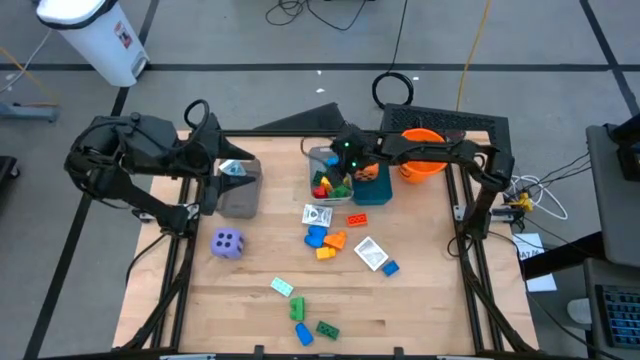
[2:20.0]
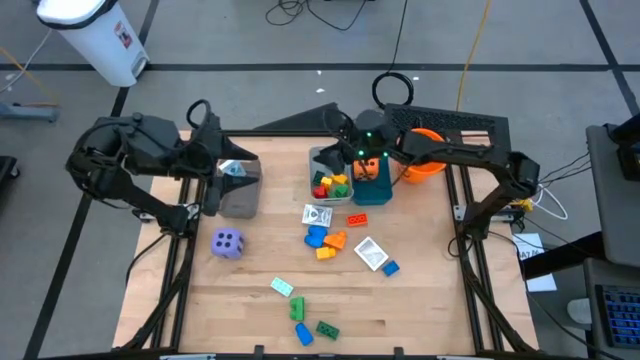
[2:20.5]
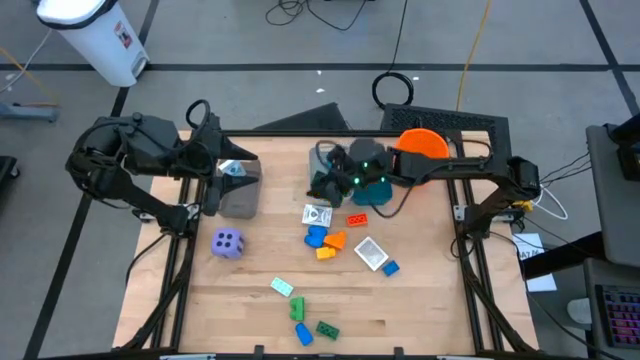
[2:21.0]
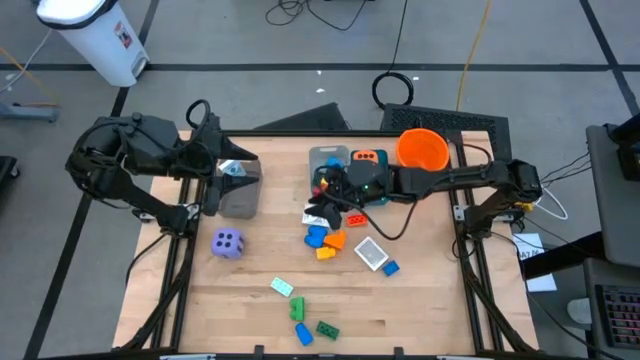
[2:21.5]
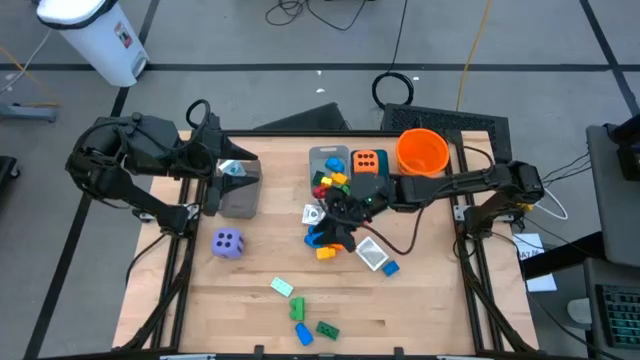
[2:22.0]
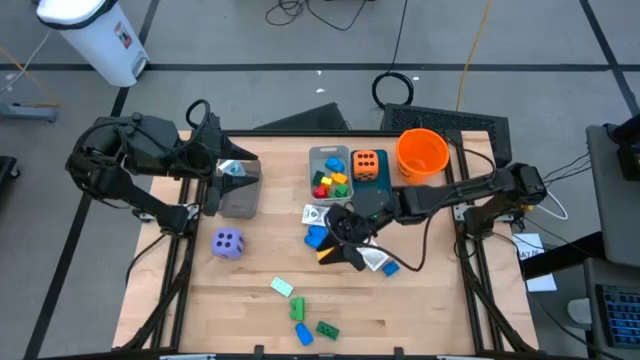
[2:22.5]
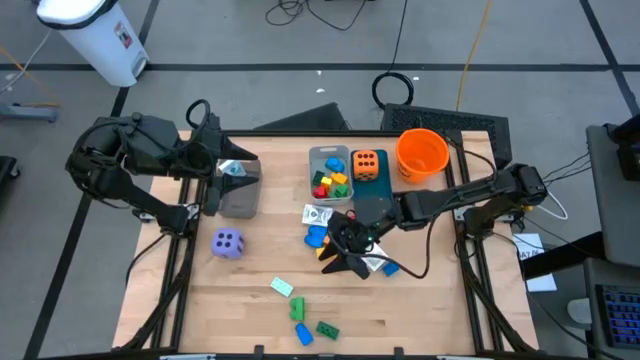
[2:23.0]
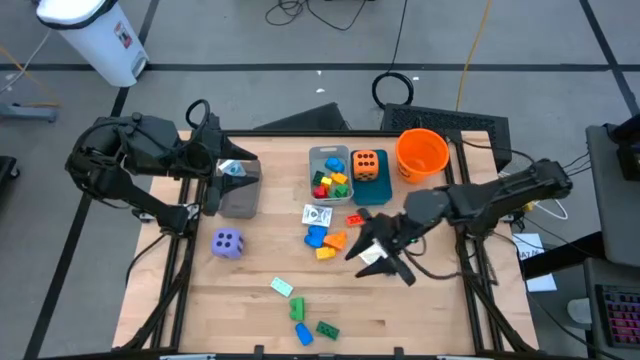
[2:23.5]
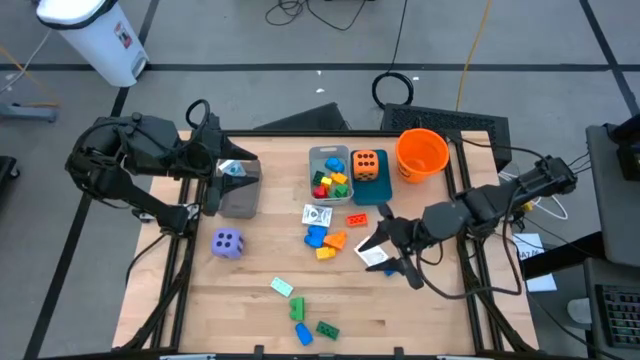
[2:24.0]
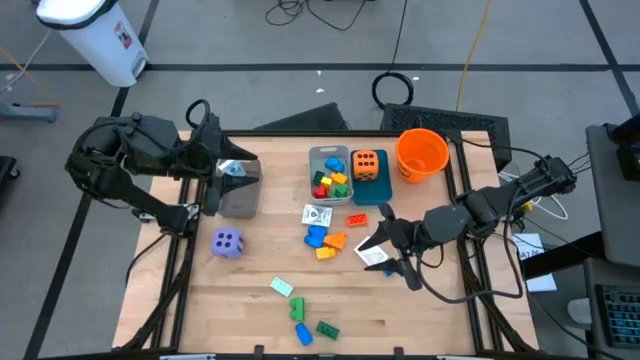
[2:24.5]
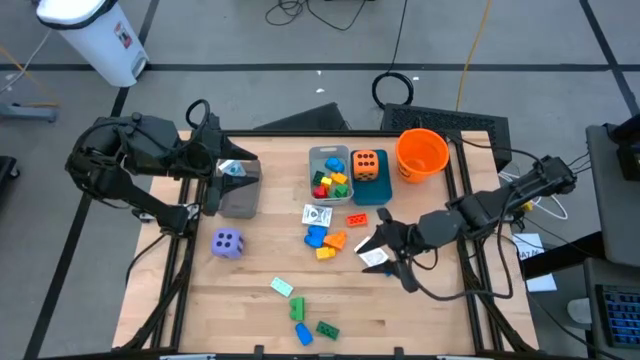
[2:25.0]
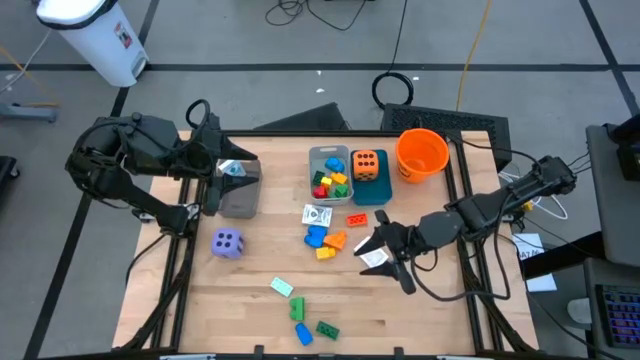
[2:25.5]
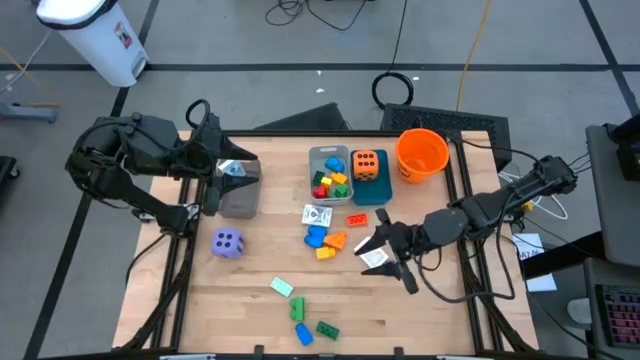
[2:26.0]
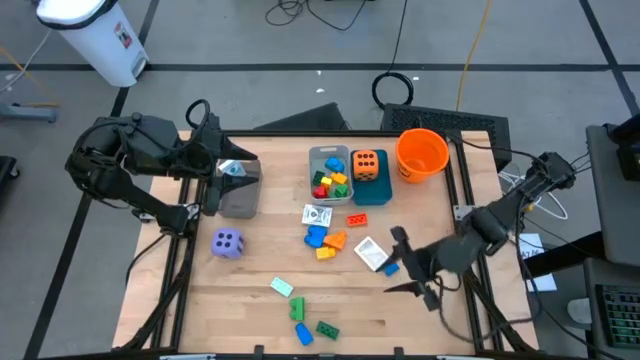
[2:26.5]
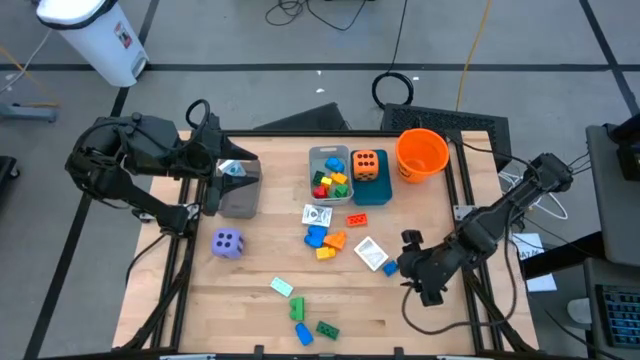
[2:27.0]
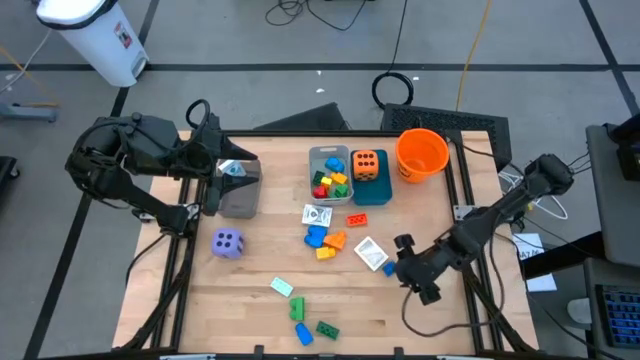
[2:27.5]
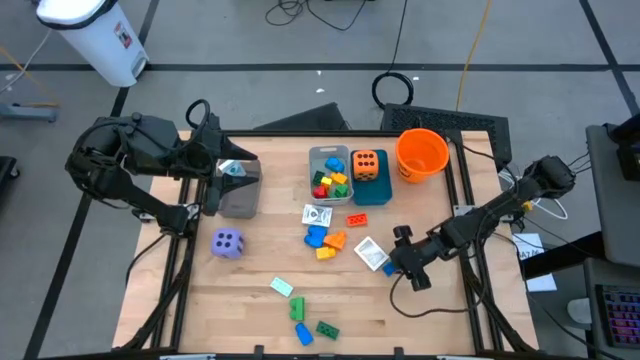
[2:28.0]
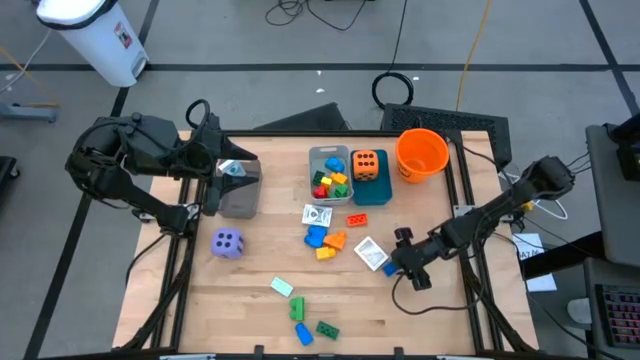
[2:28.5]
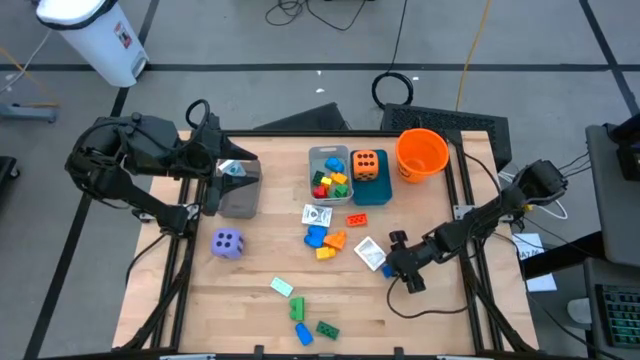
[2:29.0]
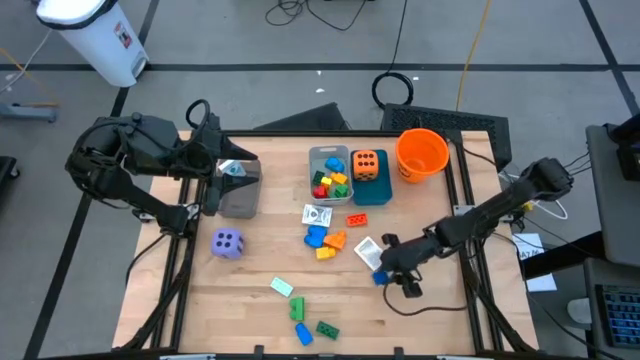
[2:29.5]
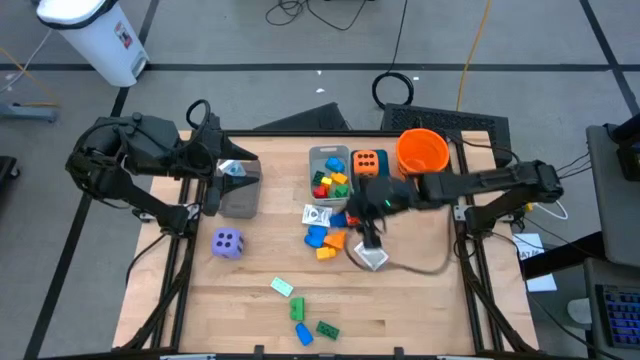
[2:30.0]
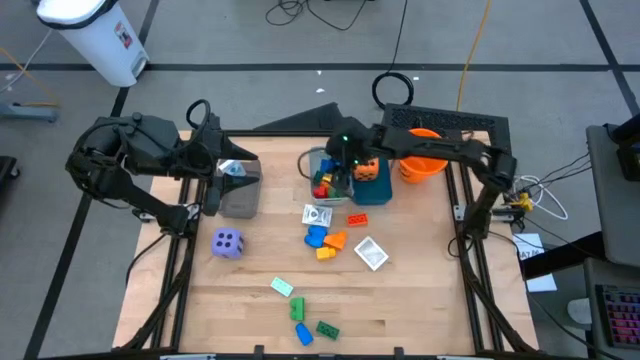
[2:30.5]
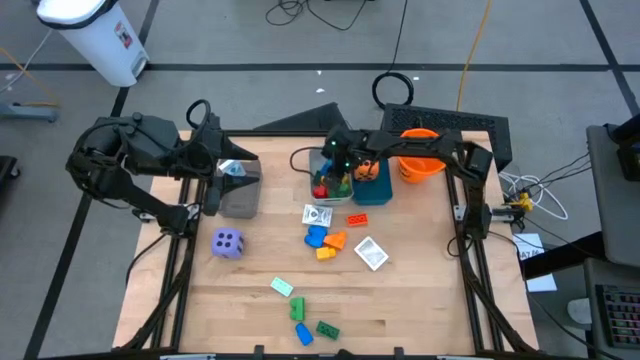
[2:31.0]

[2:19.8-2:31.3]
Task: Pick & Place Toys
Put the blue game piece into the gray bin

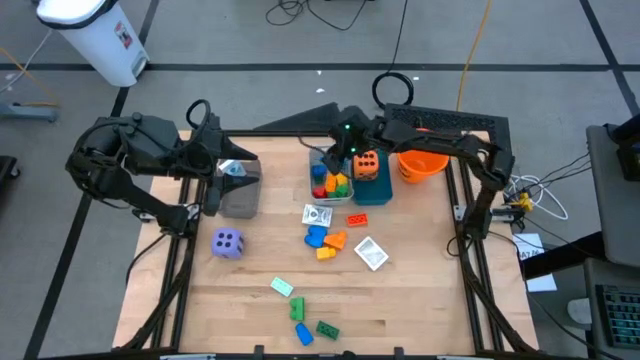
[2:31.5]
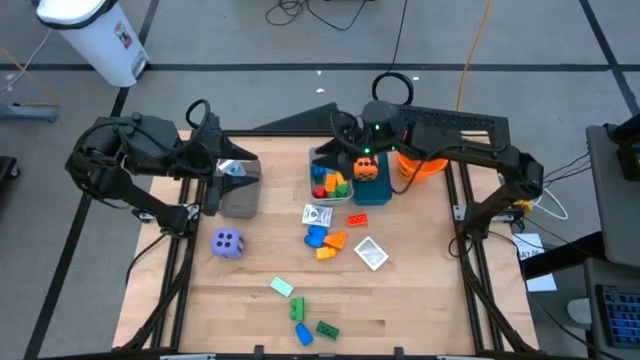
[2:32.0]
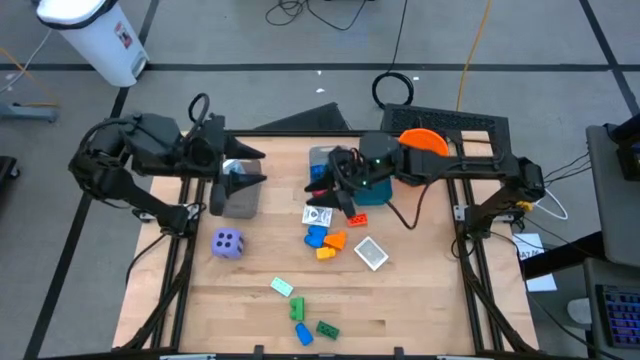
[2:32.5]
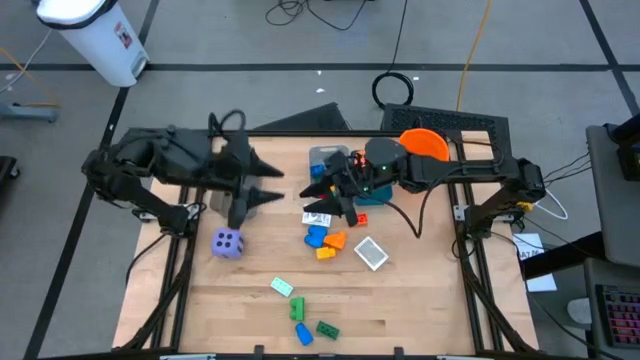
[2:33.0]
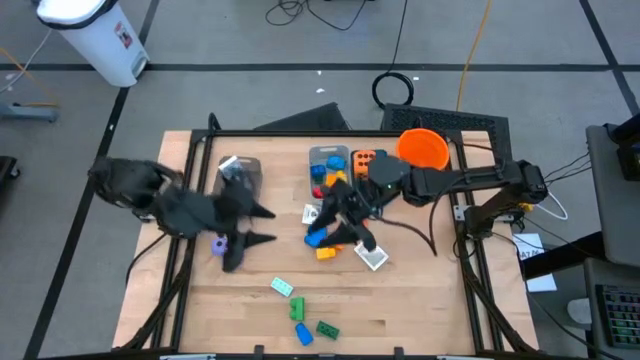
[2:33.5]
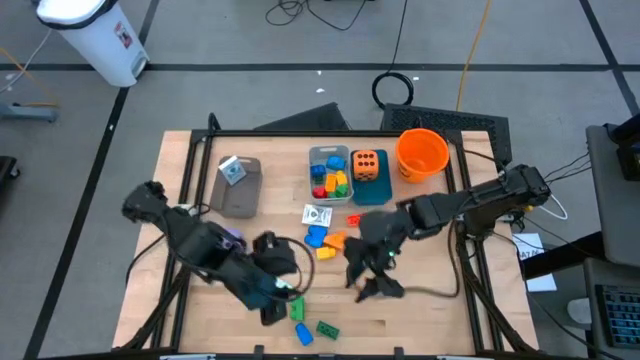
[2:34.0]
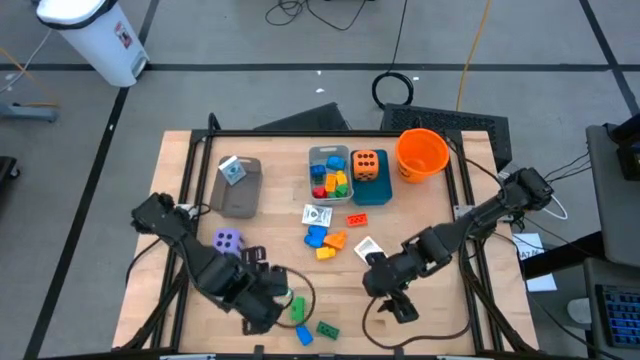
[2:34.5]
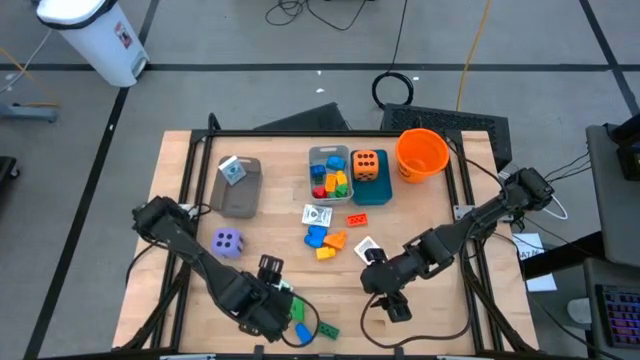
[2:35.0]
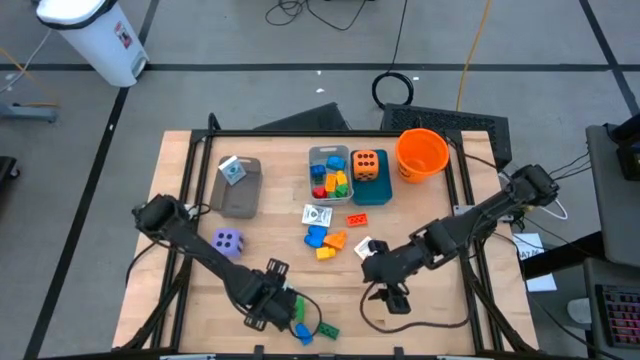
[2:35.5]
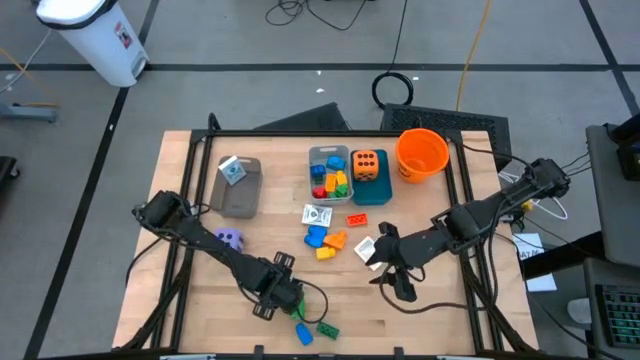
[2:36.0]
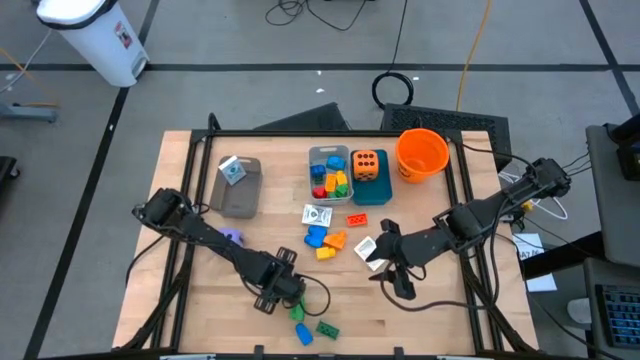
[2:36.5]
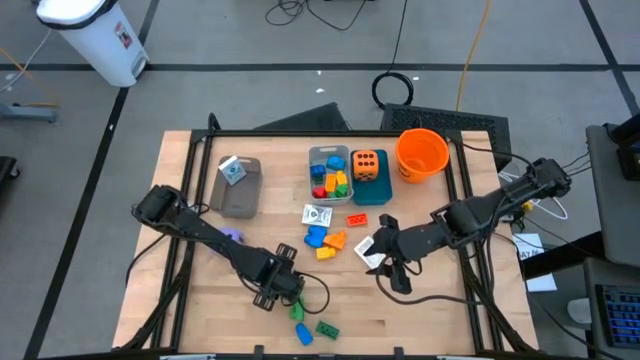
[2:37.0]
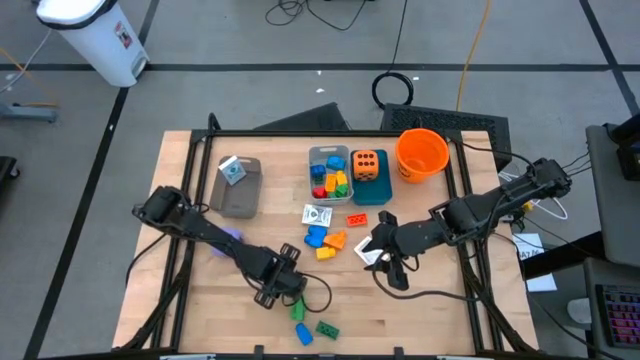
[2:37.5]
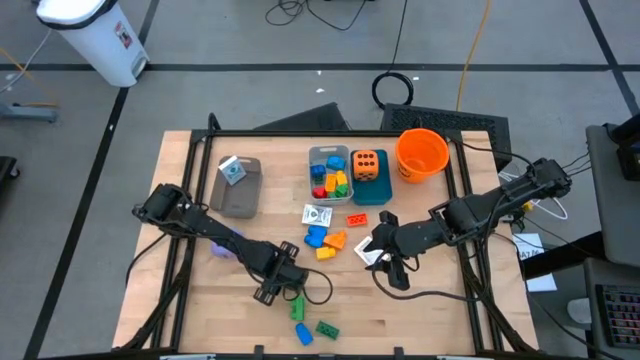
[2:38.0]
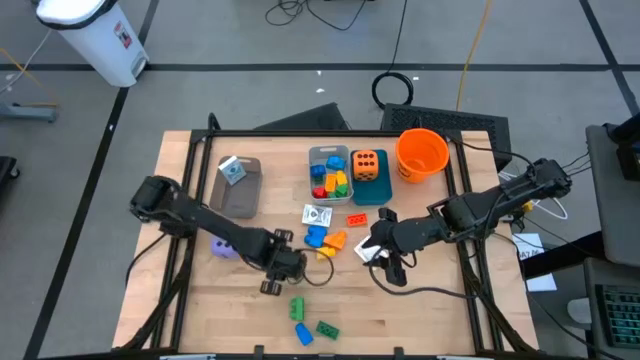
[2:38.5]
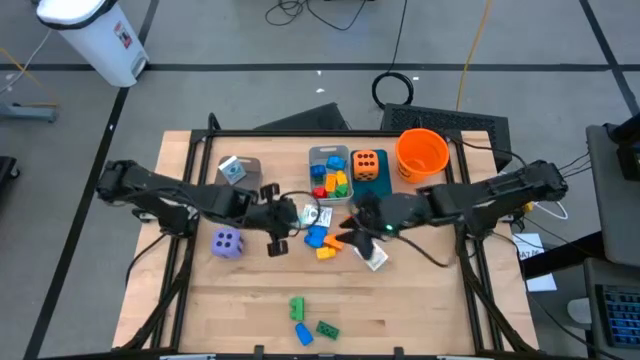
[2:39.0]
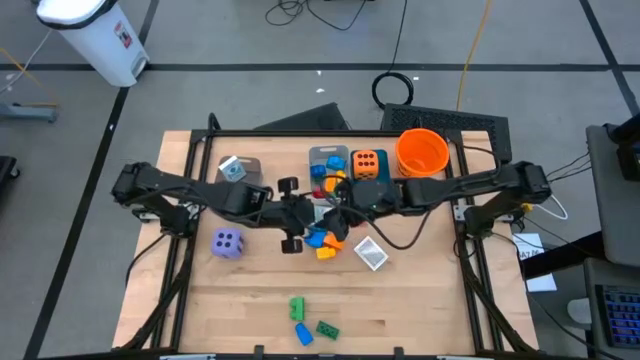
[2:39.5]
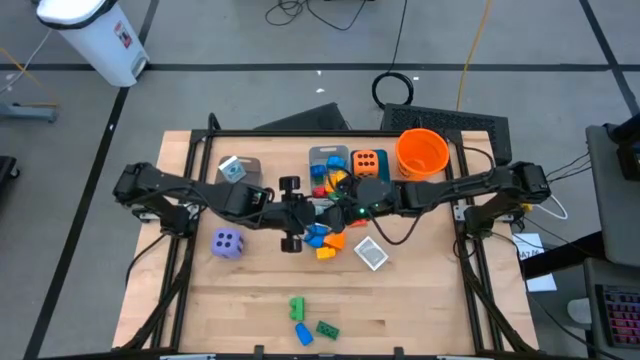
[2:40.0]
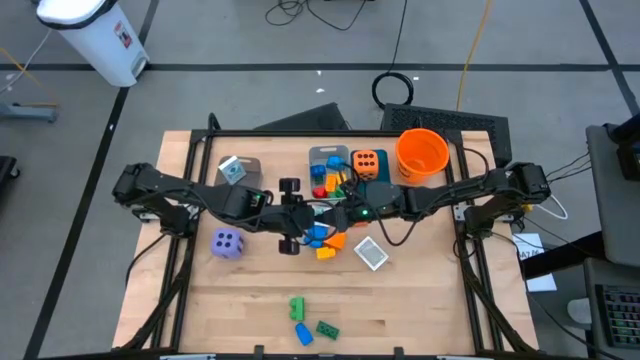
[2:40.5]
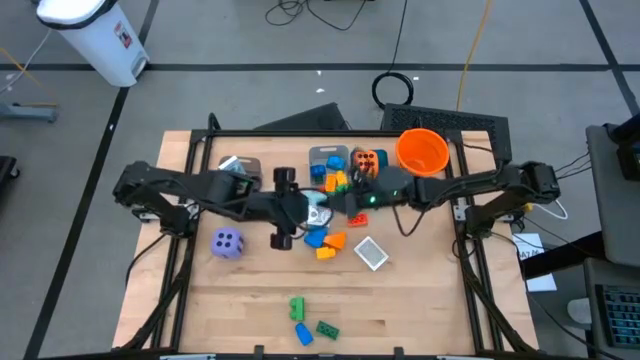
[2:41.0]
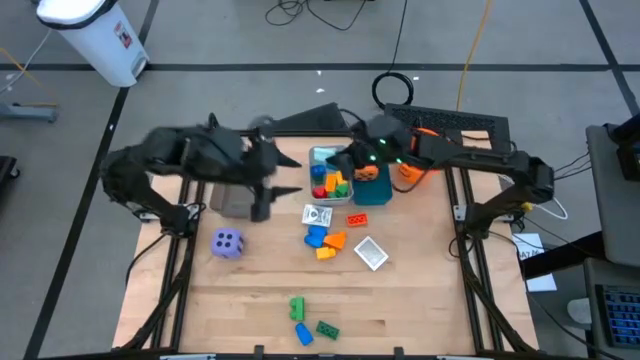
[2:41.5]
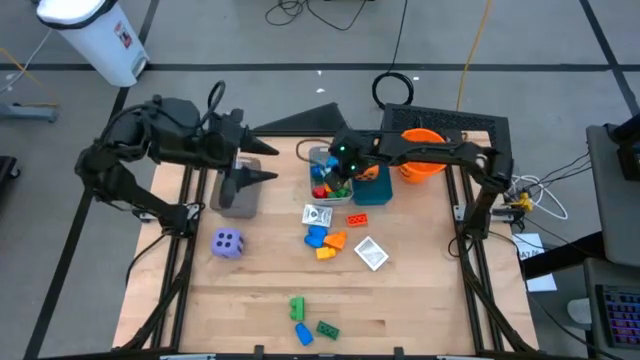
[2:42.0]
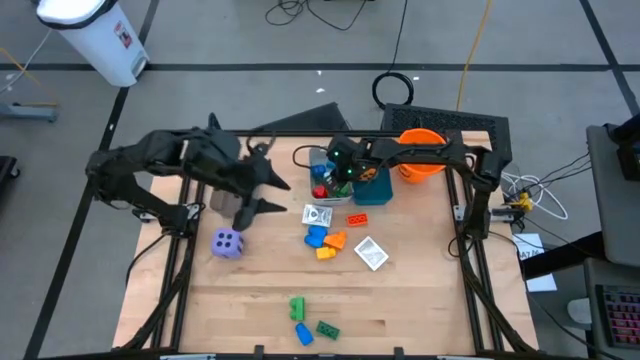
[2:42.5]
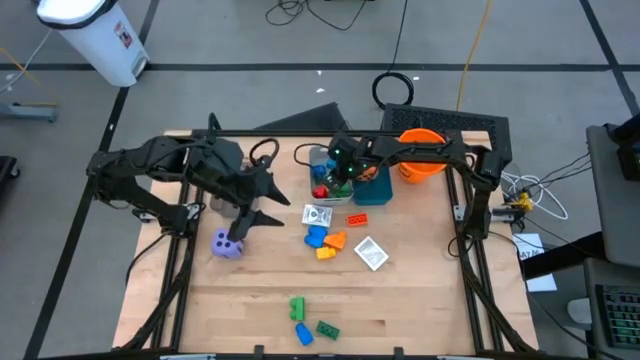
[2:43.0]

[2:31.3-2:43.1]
Put the light blue game piece into the gray bin
